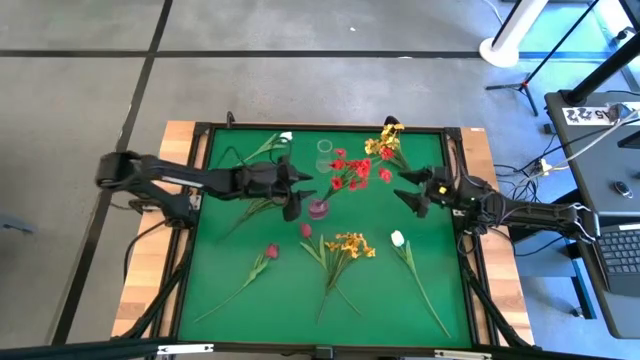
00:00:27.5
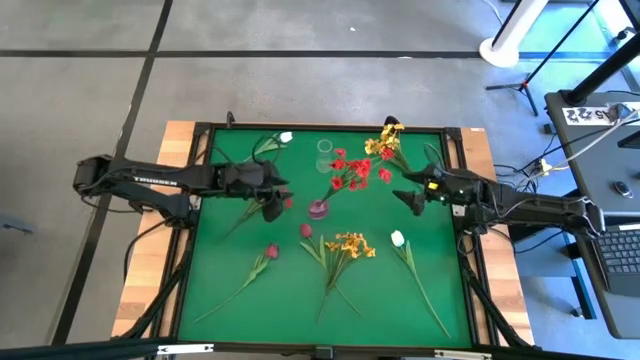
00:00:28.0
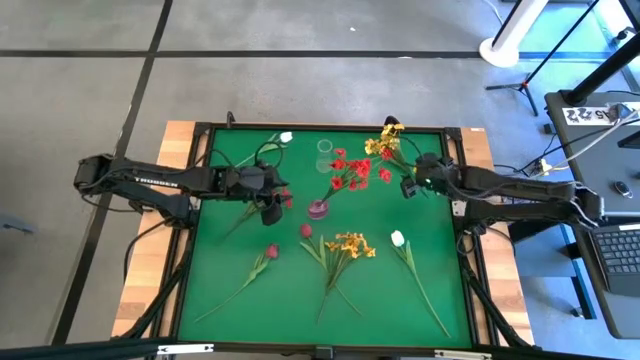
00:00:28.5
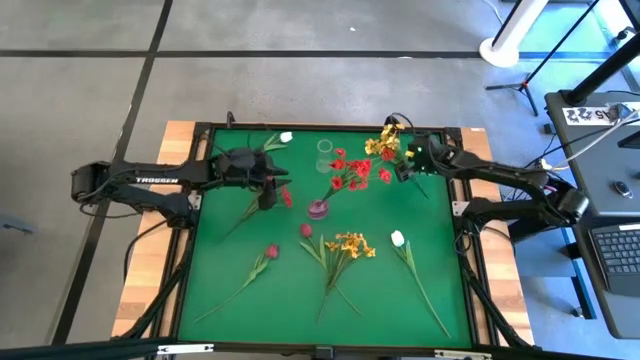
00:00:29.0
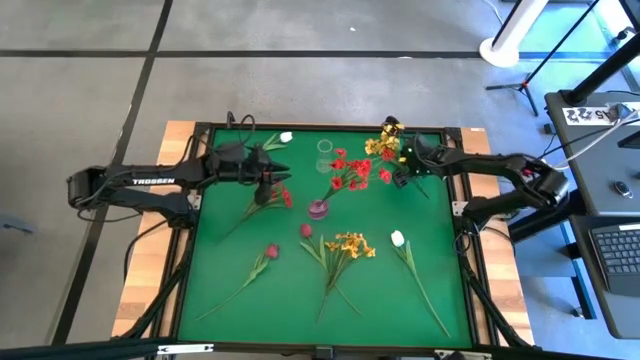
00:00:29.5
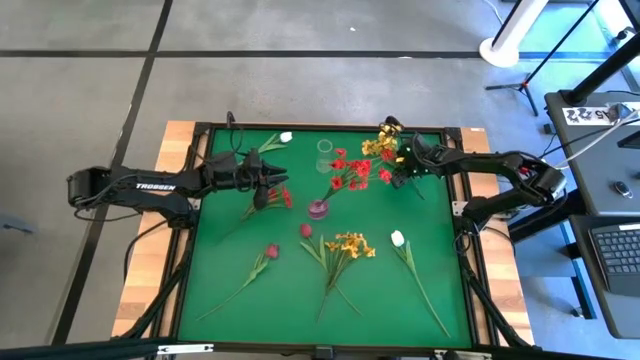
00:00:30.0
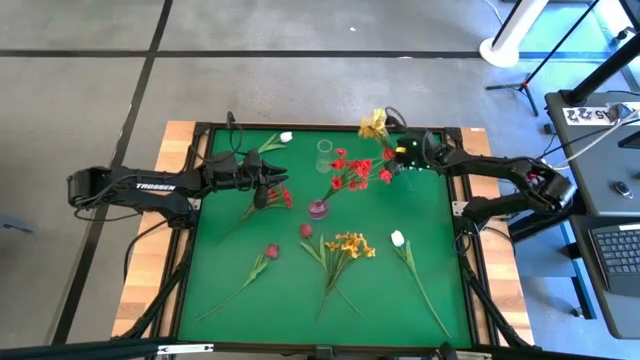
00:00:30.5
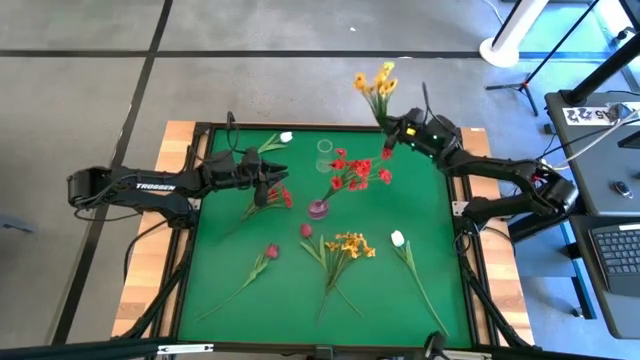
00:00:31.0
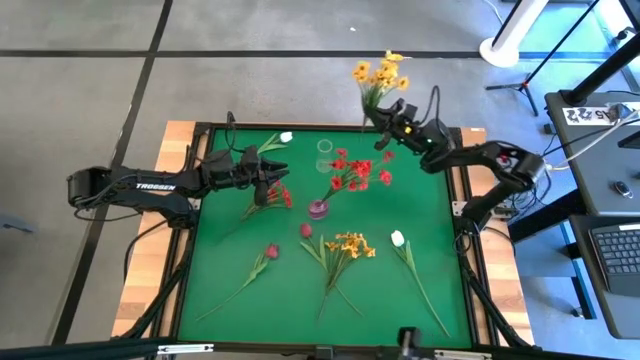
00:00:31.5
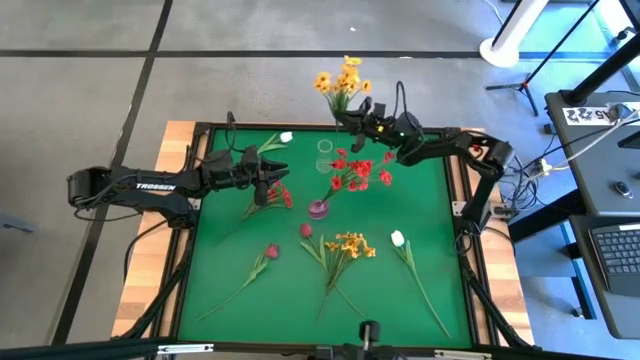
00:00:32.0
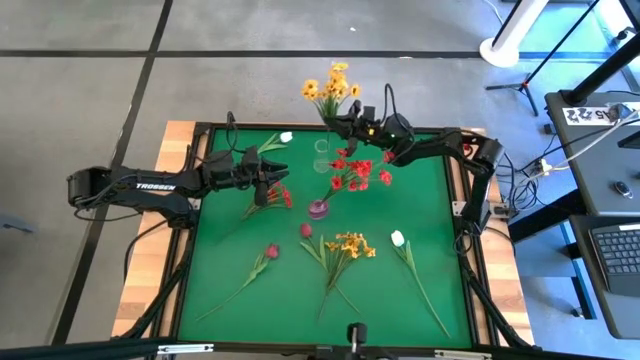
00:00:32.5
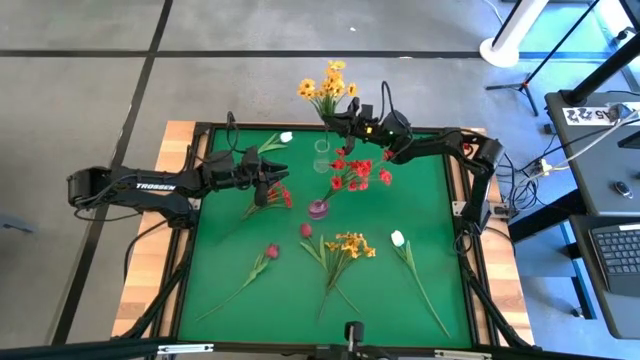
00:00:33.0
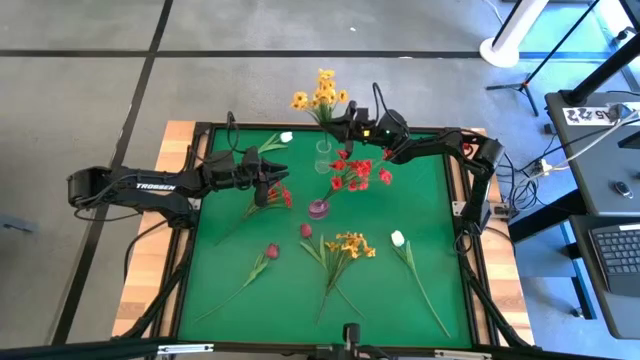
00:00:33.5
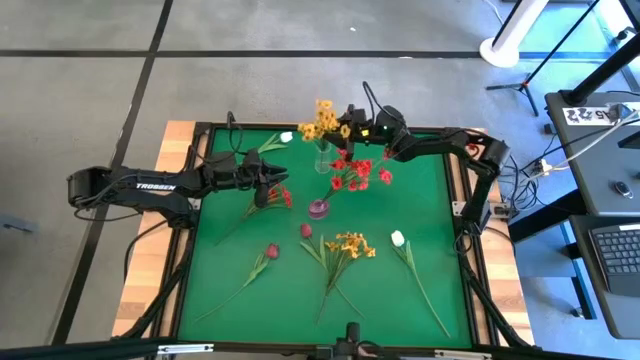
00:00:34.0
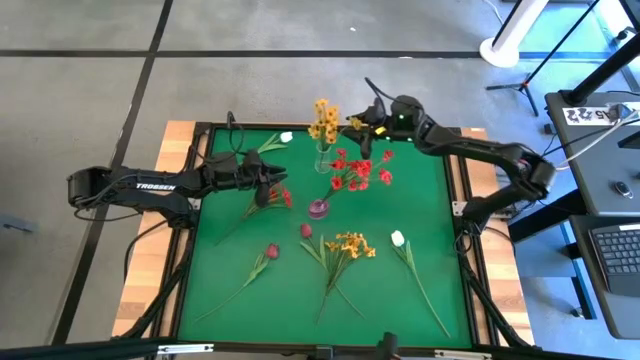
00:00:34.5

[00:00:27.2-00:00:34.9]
Task: Sort flowers into vase by color
Put the top yellow flowers into the transparent vase

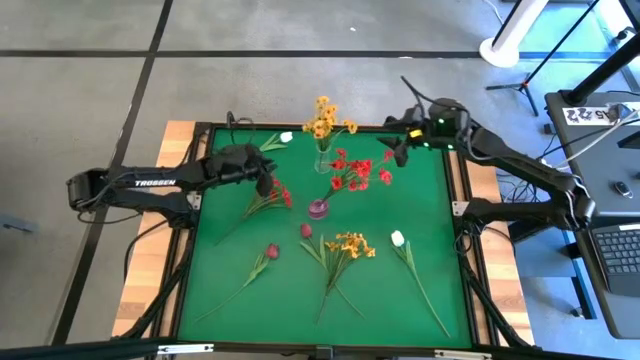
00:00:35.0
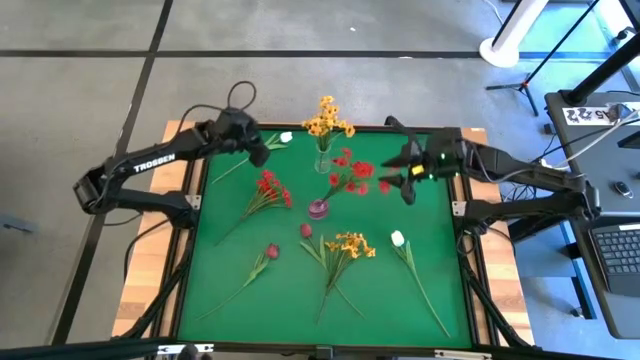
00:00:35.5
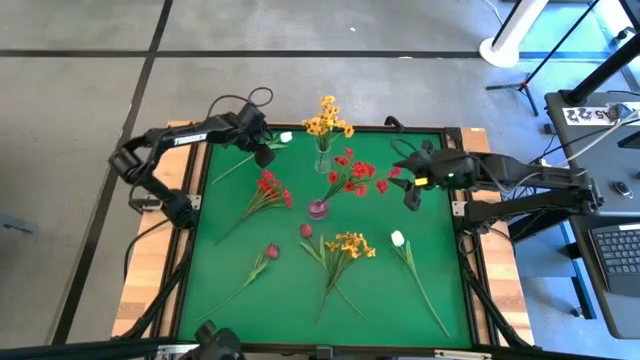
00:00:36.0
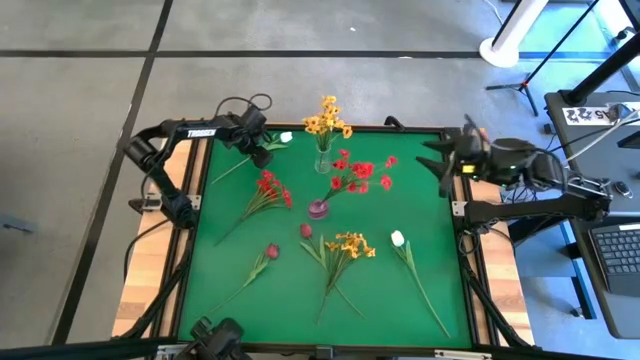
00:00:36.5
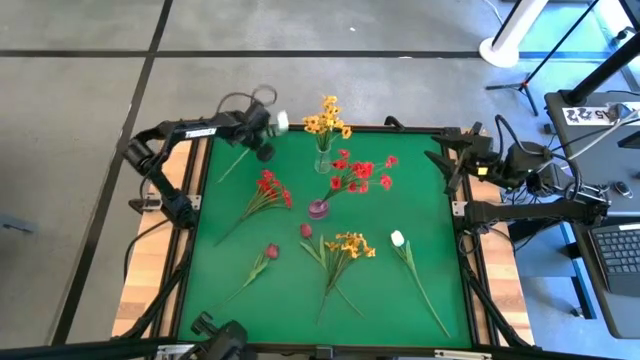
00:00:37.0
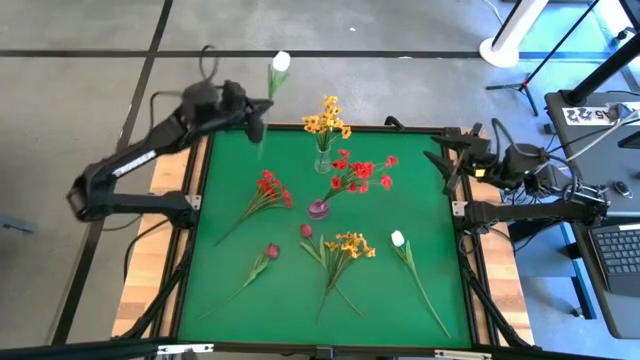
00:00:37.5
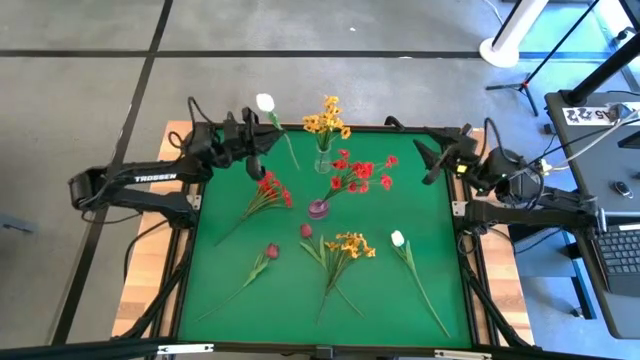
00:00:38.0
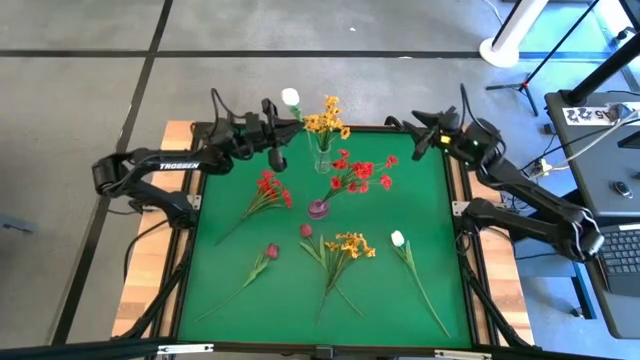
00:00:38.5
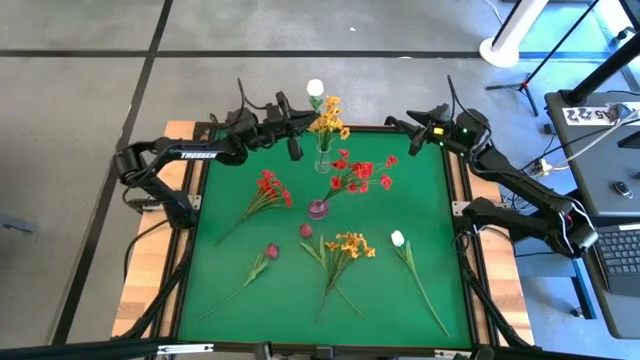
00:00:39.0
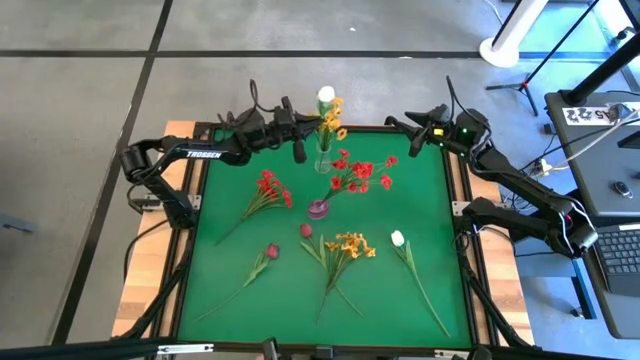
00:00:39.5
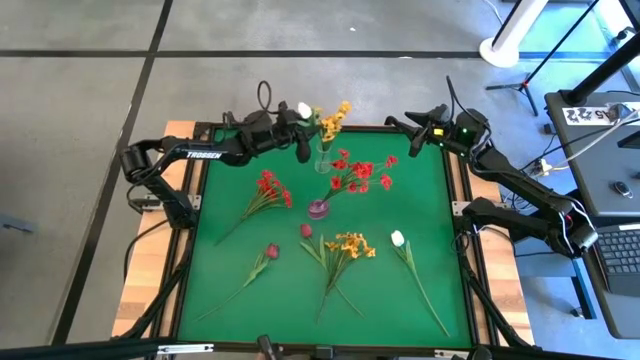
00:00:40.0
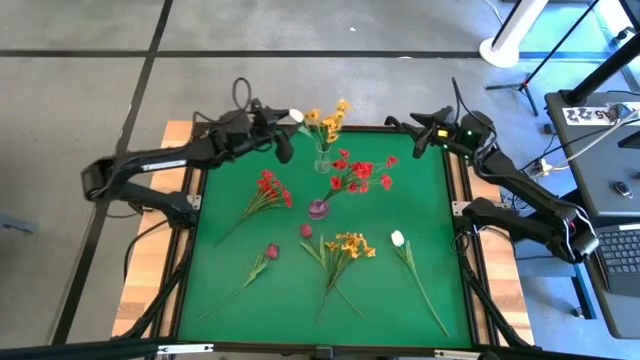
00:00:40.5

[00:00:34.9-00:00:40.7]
Put the top white tulip into the transparent vase
